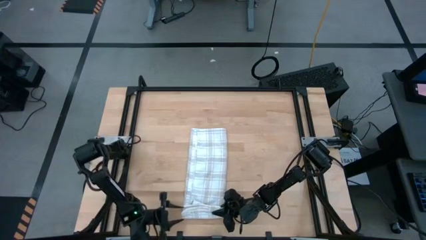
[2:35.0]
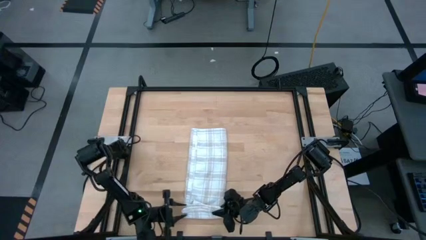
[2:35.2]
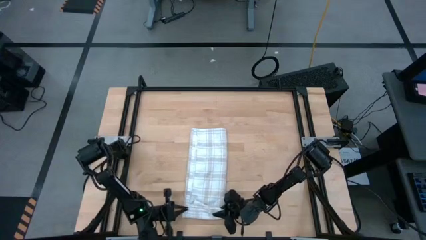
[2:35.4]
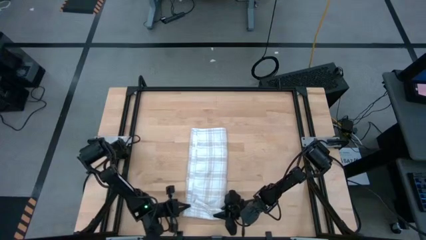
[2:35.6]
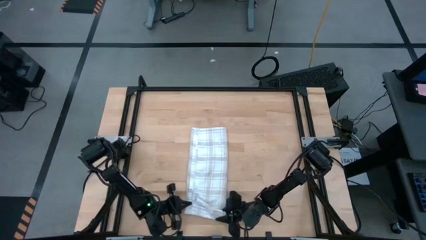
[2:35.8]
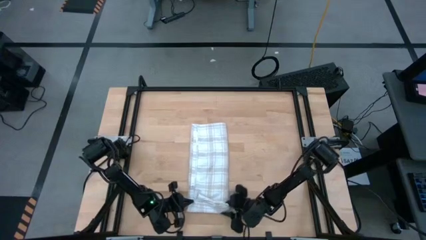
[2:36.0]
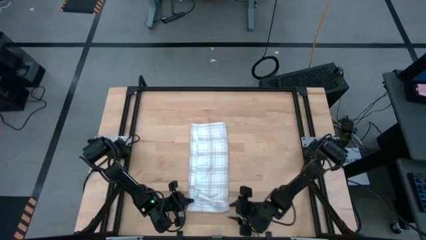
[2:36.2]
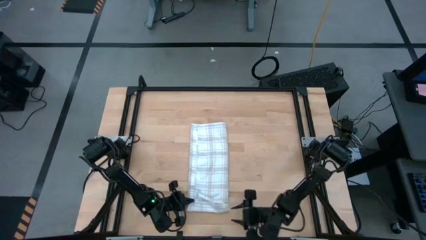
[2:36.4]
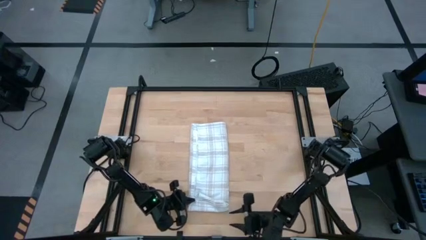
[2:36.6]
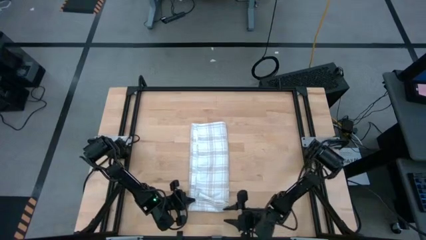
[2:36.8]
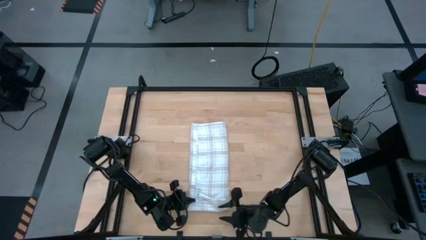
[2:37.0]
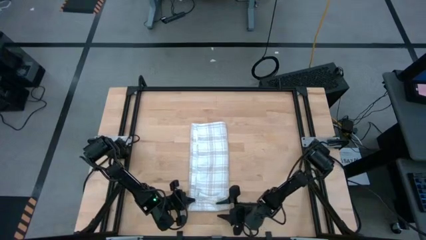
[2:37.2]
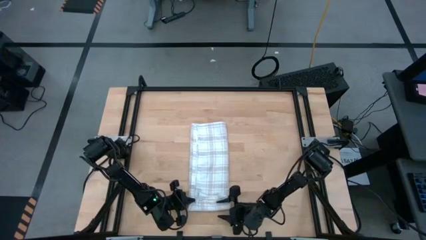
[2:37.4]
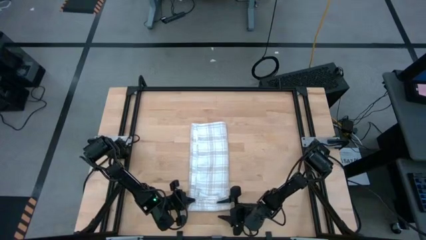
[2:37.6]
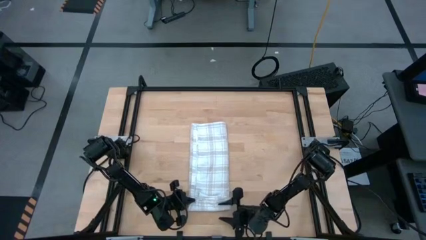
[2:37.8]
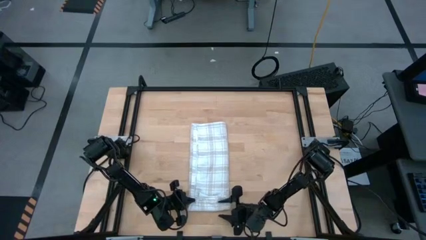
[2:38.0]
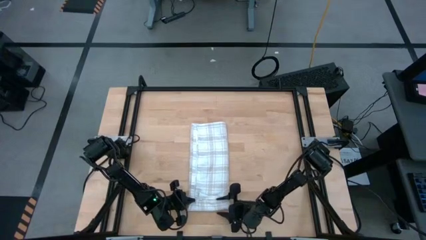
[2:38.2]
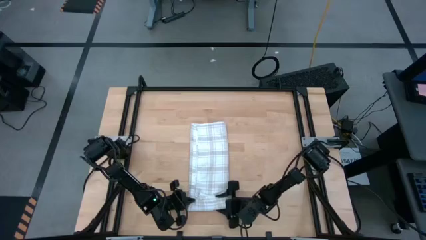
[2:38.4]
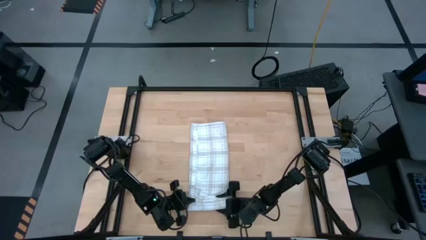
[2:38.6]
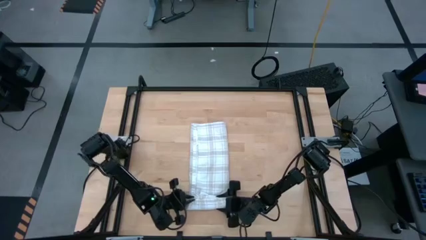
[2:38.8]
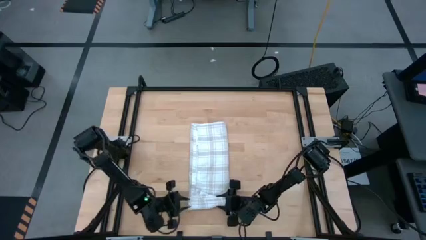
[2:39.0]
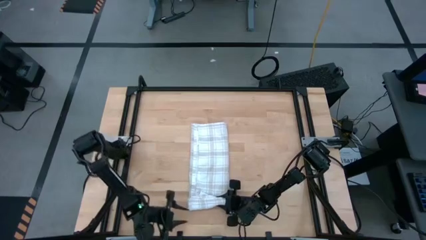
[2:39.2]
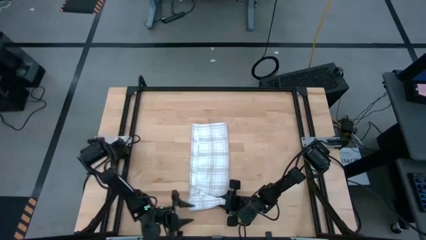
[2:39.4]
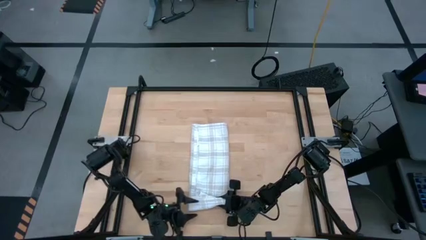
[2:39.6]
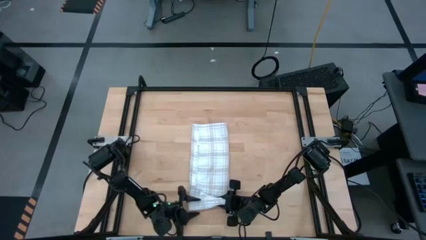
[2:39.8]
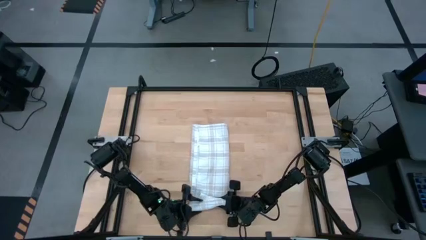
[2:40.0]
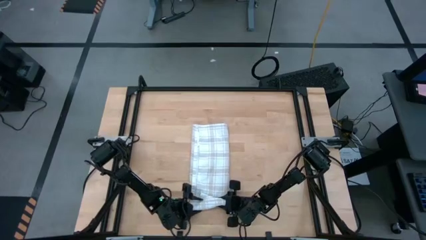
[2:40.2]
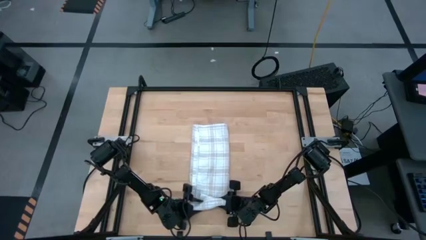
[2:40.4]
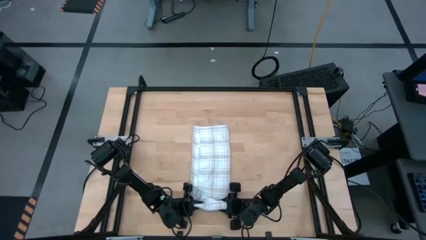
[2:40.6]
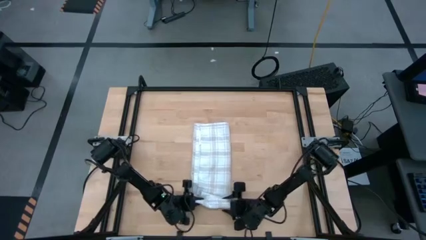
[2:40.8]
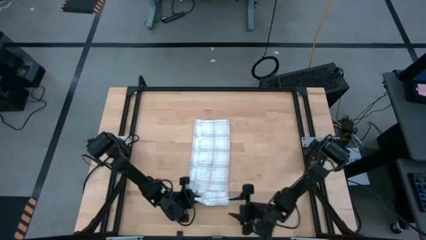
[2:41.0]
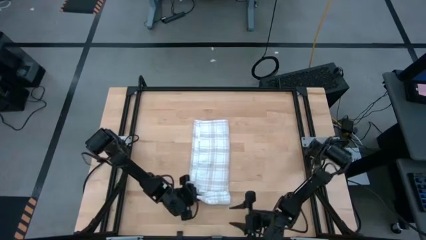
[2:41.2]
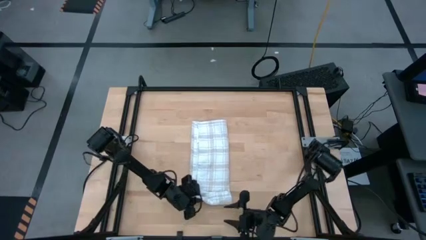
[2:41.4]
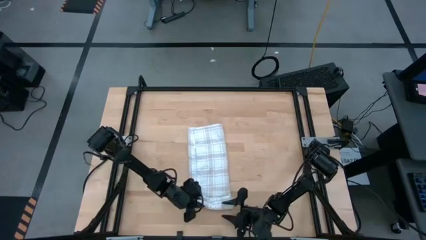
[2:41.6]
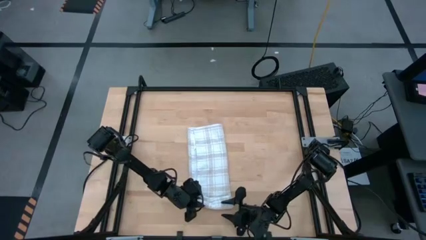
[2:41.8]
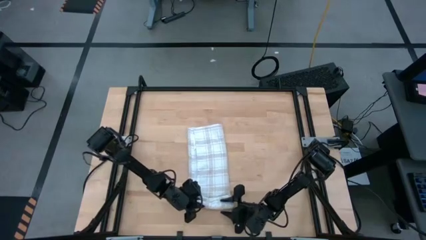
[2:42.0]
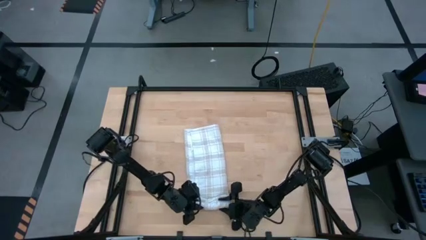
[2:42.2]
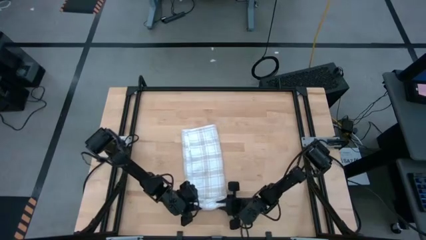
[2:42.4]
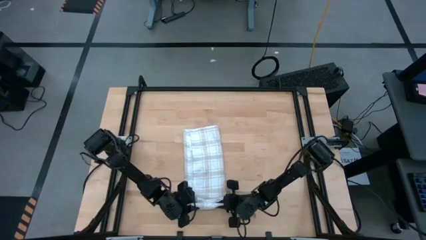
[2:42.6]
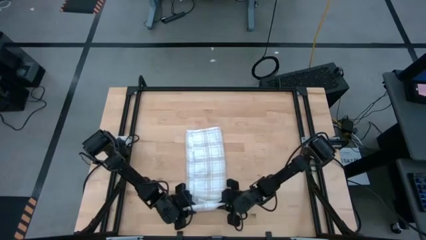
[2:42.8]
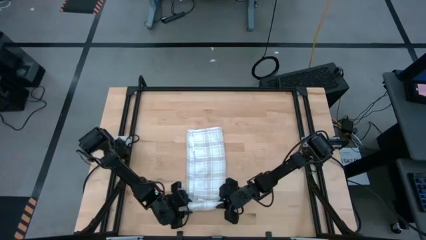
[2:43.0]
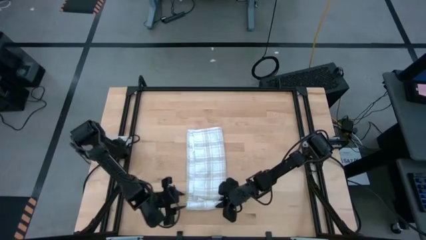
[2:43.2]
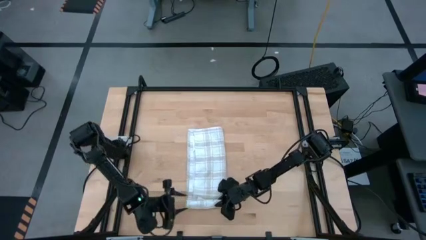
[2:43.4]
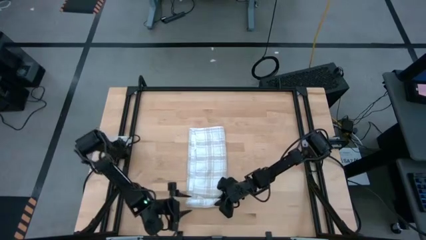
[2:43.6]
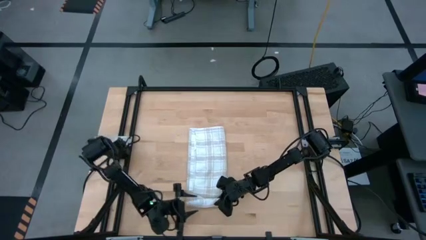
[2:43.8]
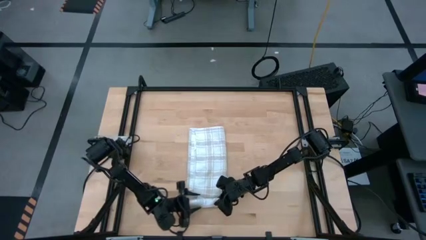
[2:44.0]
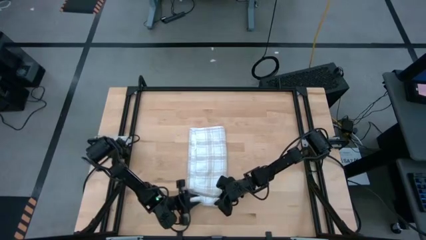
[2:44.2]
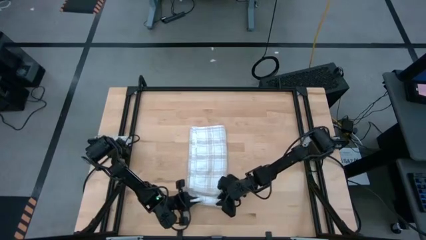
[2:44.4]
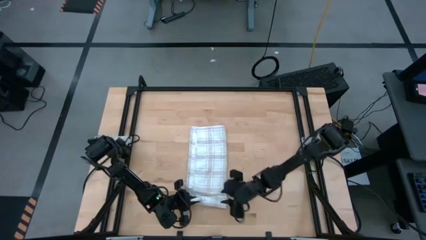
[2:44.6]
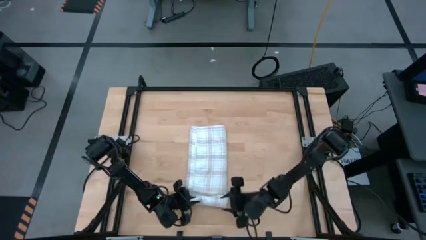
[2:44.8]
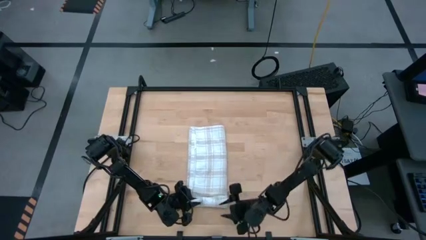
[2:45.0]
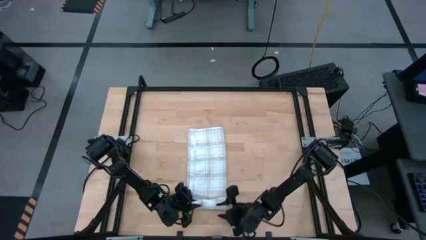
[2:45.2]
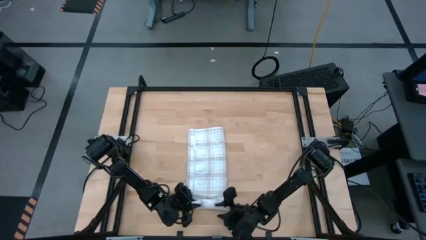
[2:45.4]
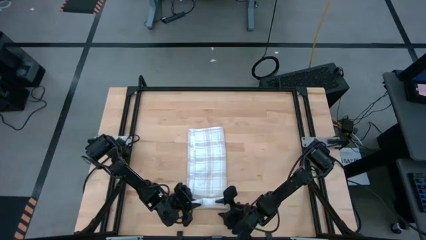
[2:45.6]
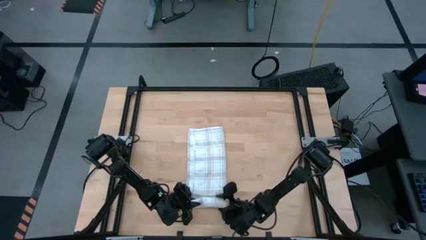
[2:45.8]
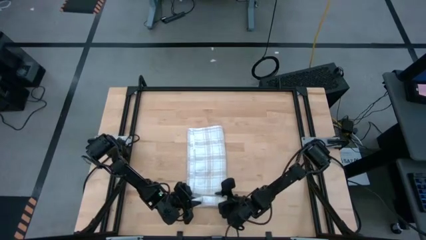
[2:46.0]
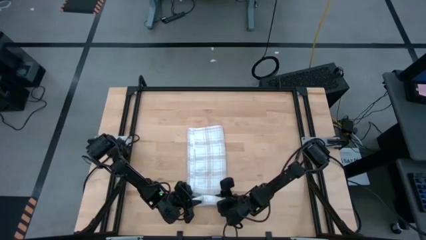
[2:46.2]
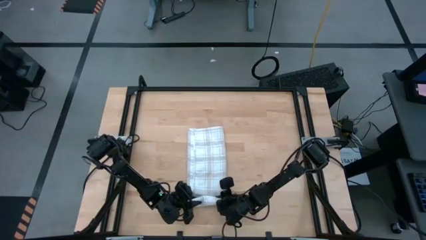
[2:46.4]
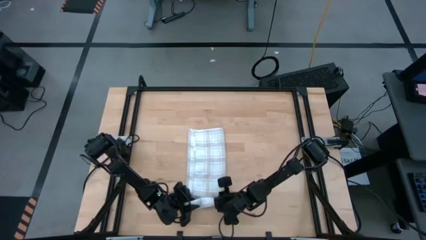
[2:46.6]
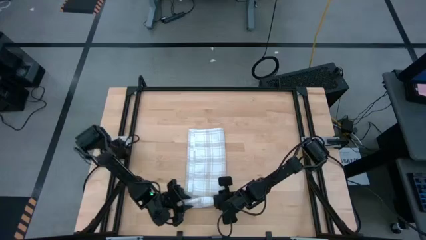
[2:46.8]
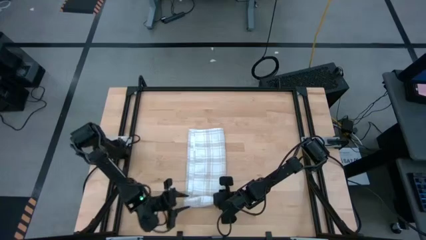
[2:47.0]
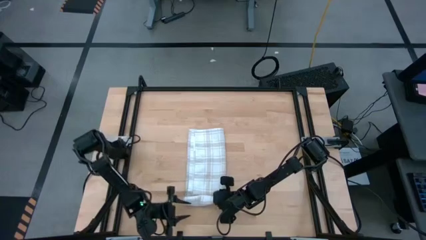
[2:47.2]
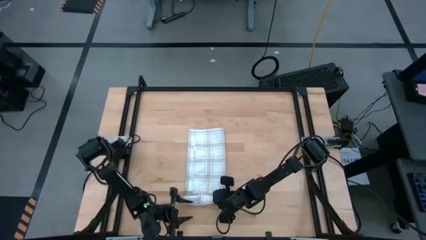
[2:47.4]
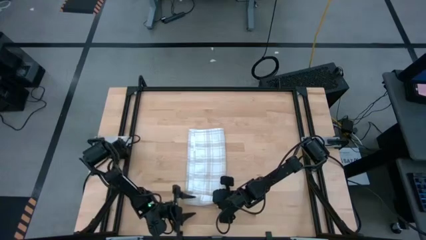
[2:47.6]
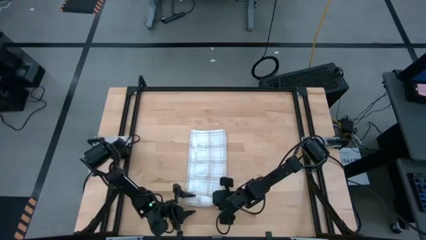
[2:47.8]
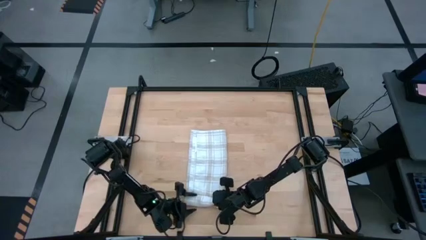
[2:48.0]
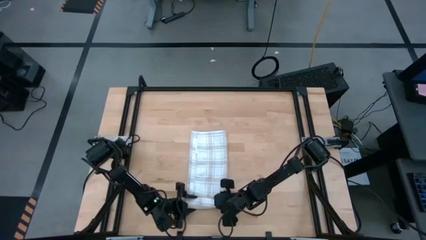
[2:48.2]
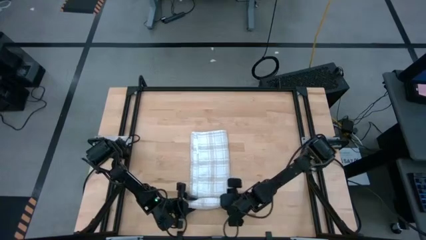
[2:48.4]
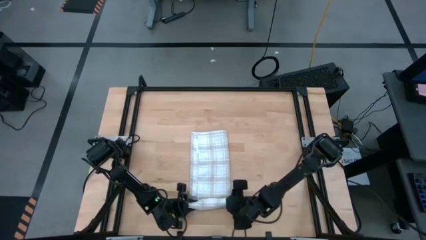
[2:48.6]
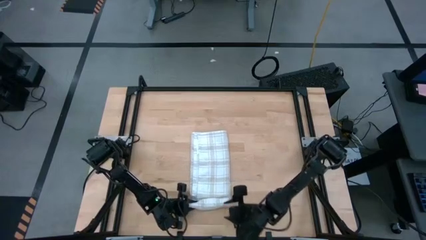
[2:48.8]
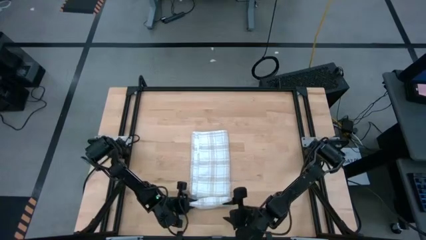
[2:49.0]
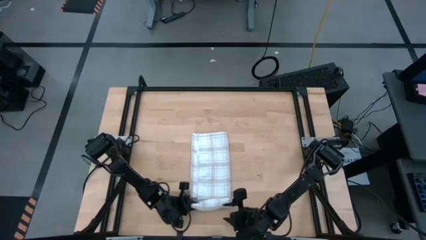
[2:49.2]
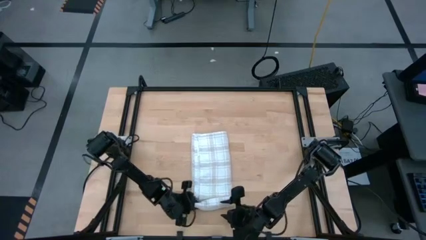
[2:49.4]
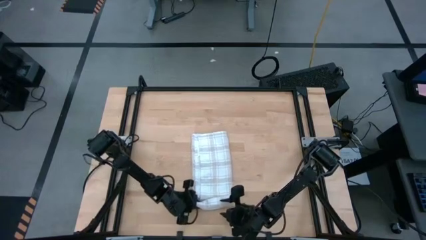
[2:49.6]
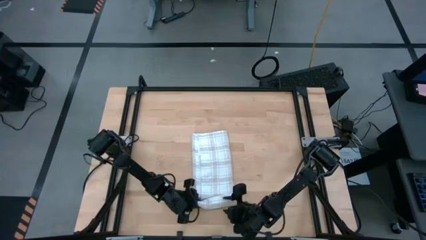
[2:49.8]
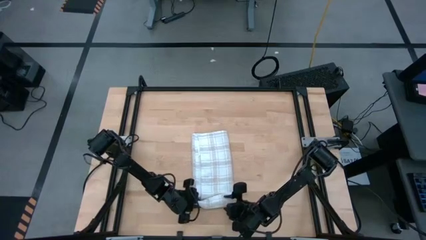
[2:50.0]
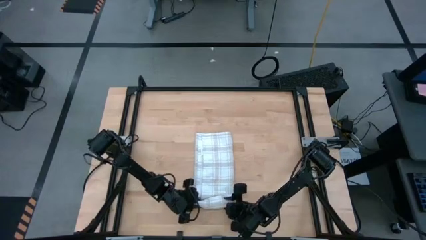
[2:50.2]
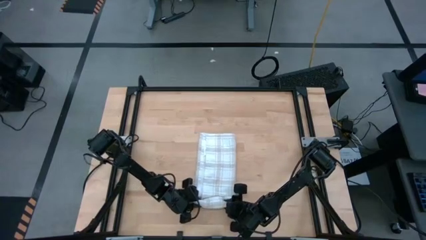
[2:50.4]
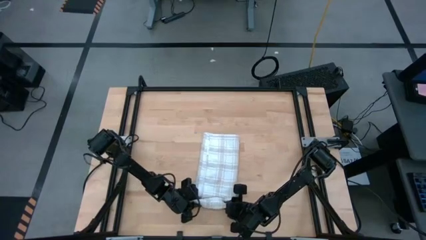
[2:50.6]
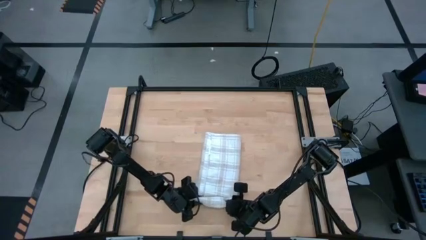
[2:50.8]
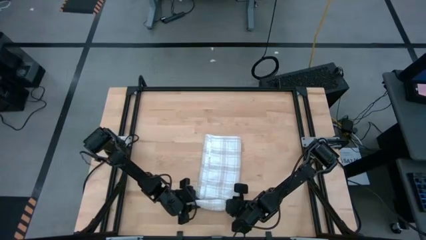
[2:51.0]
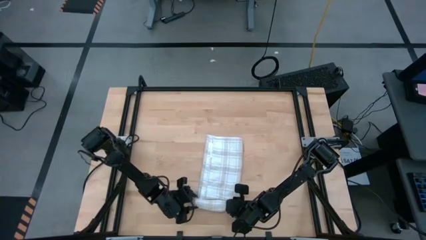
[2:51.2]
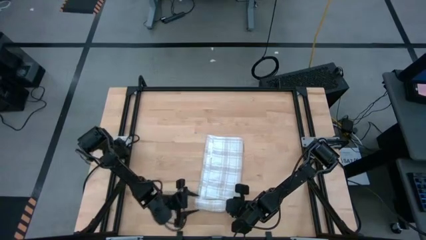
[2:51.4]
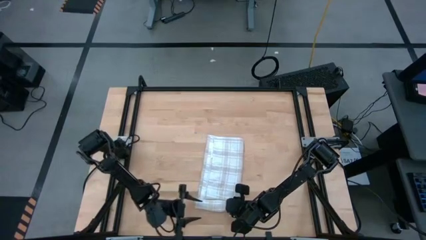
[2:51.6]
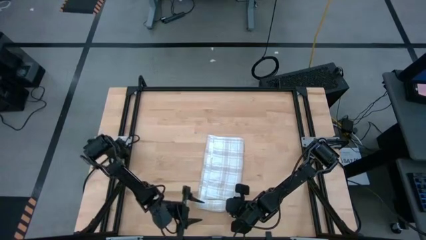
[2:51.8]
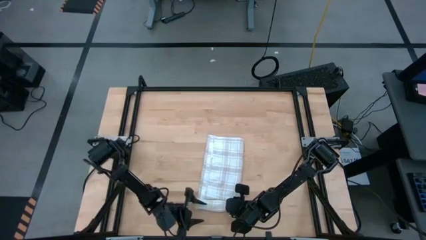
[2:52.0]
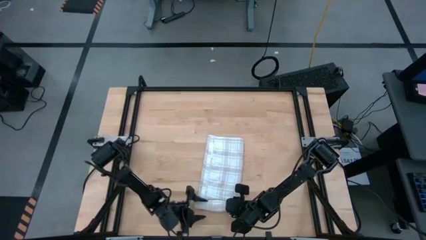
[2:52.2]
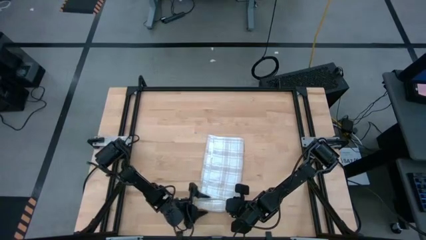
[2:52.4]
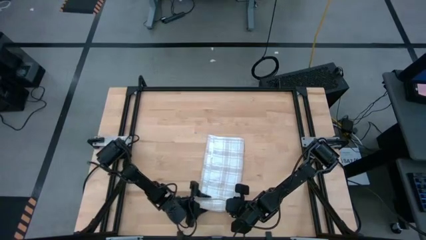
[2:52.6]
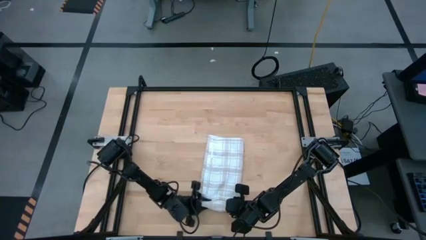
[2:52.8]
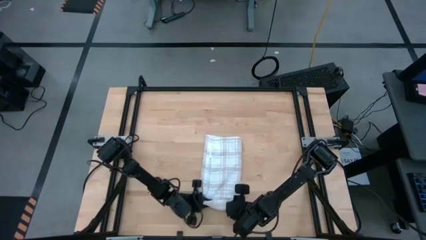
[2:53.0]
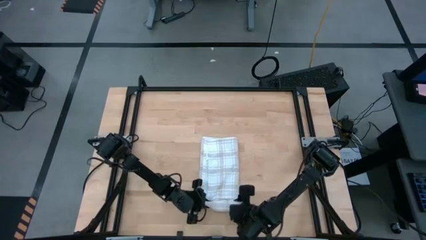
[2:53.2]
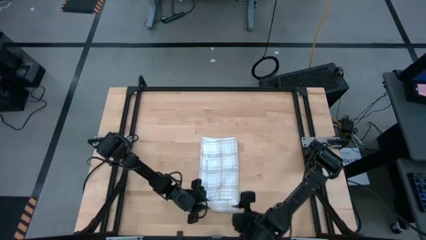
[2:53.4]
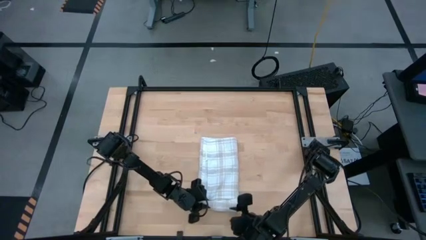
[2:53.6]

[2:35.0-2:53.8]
Task: Roll towel
Roll the white kitchen towel
